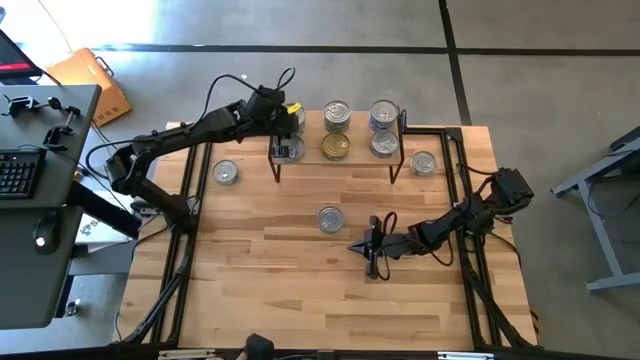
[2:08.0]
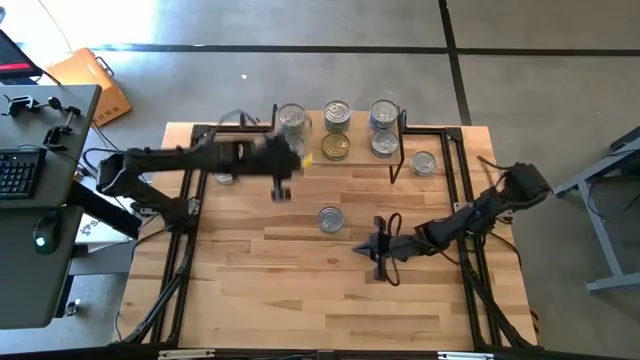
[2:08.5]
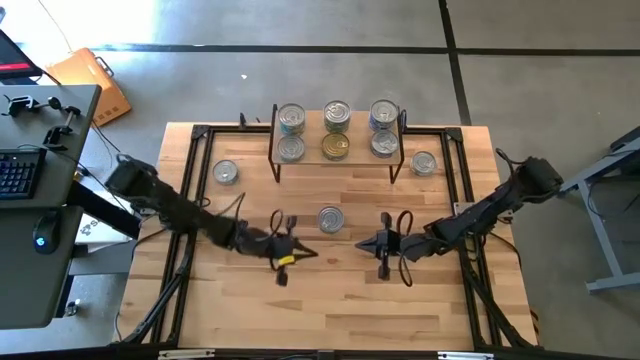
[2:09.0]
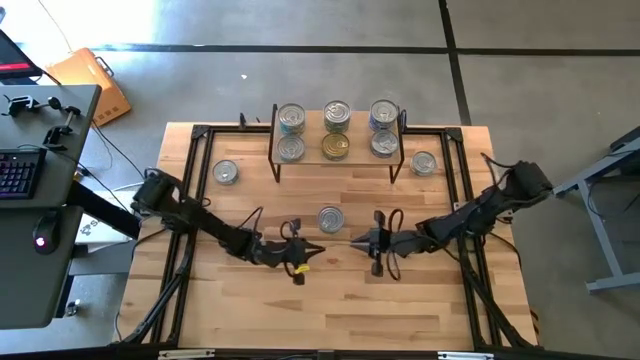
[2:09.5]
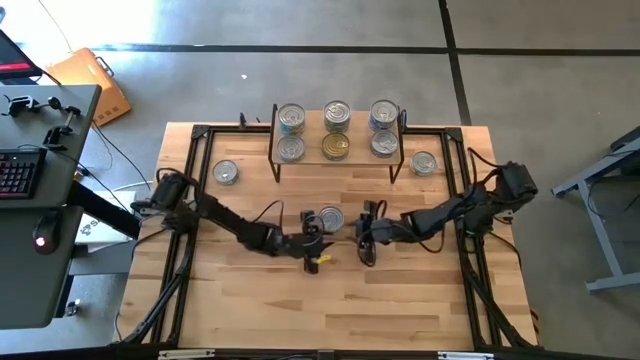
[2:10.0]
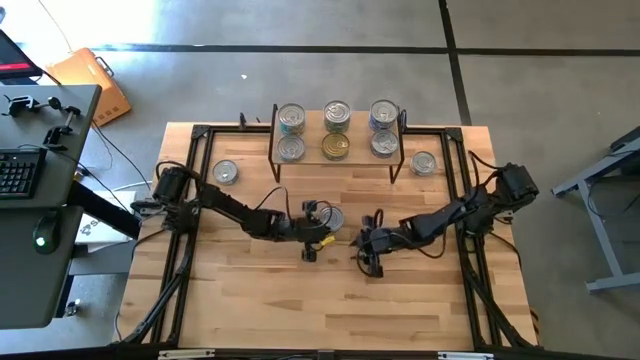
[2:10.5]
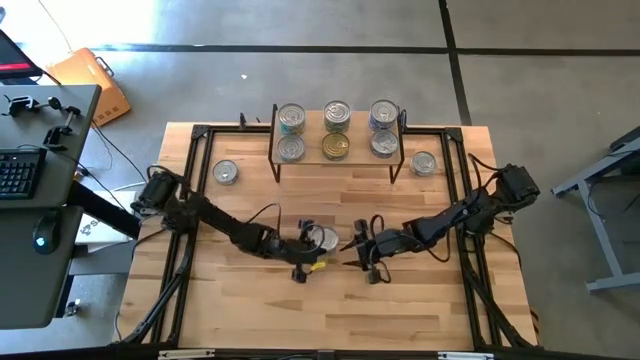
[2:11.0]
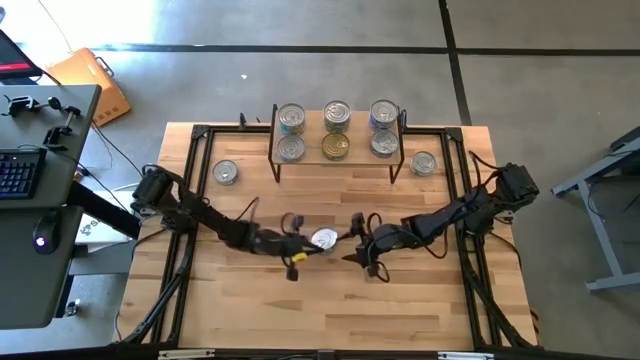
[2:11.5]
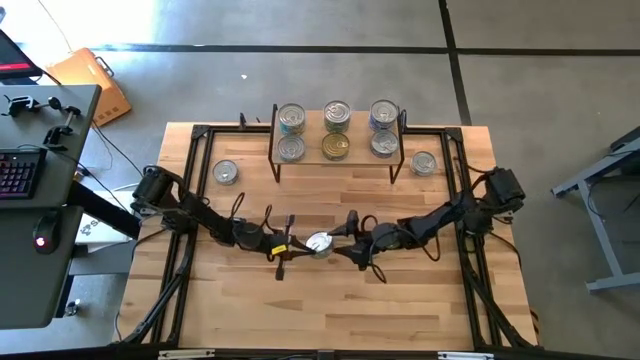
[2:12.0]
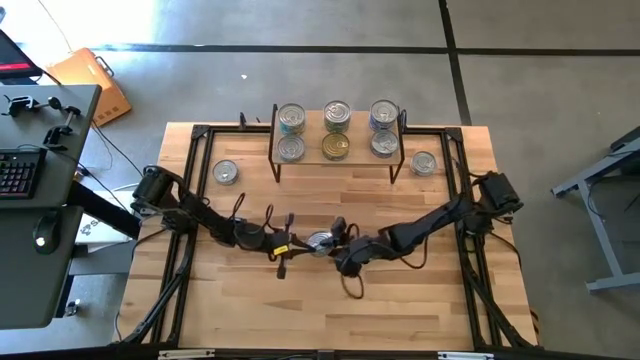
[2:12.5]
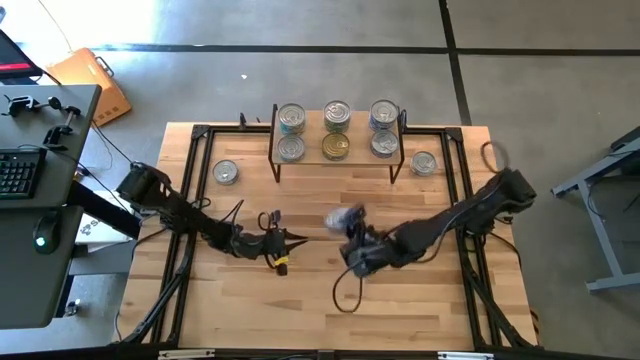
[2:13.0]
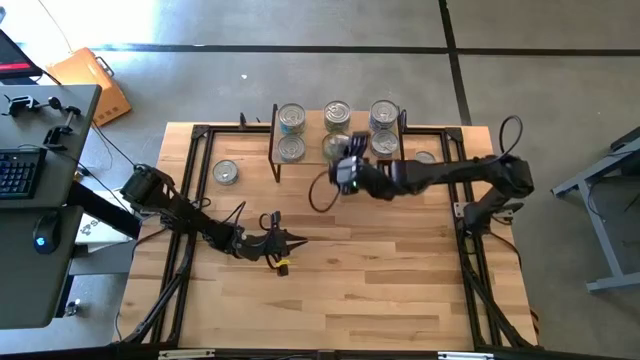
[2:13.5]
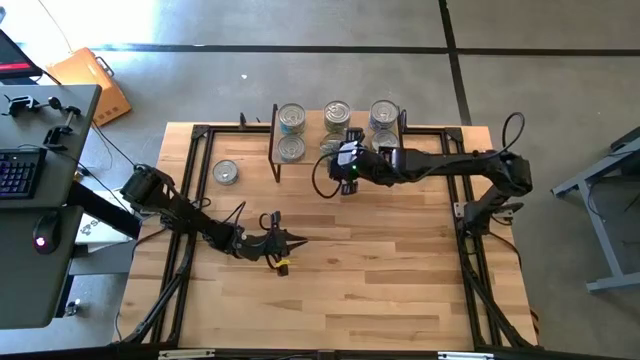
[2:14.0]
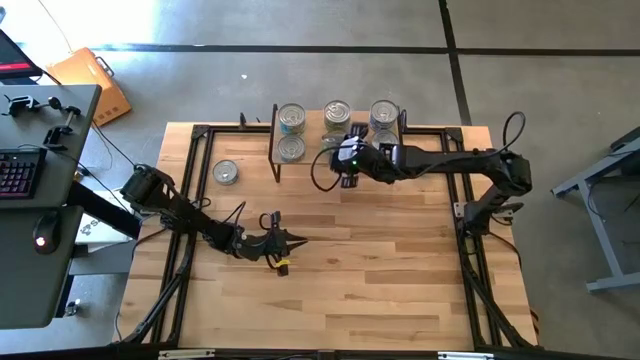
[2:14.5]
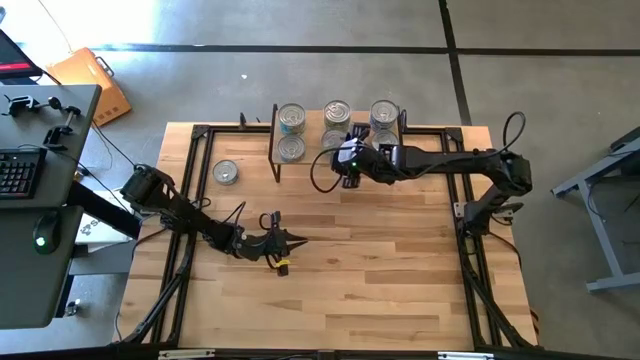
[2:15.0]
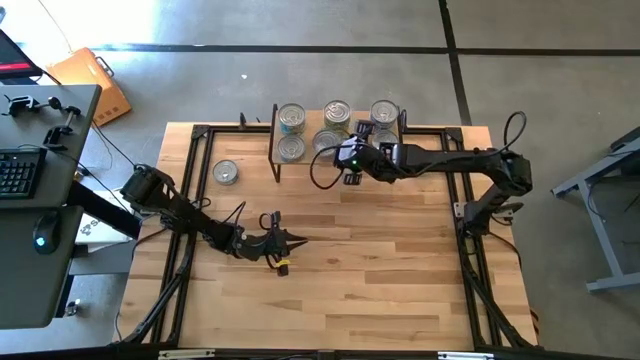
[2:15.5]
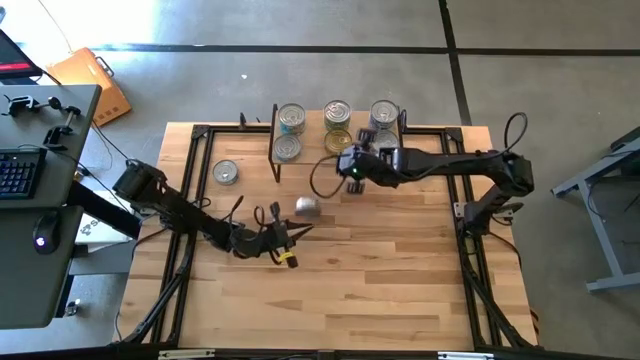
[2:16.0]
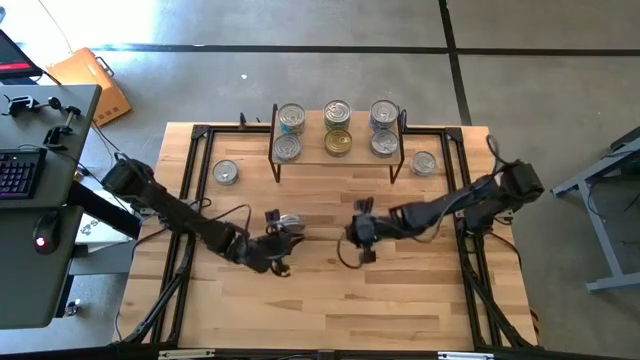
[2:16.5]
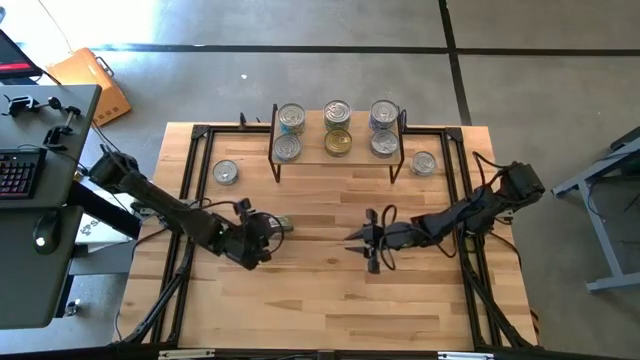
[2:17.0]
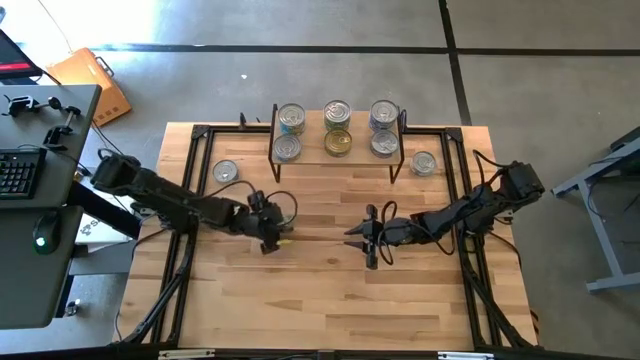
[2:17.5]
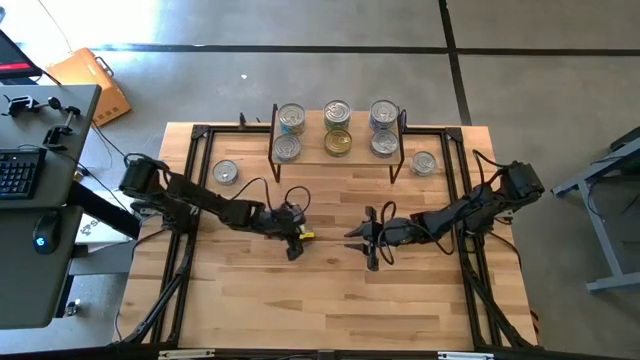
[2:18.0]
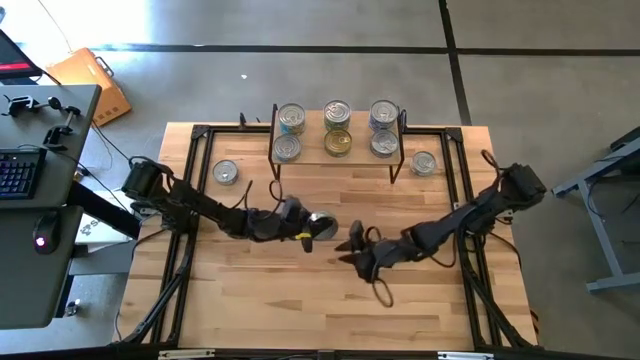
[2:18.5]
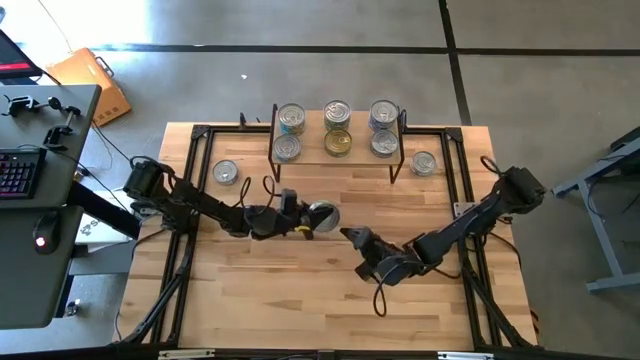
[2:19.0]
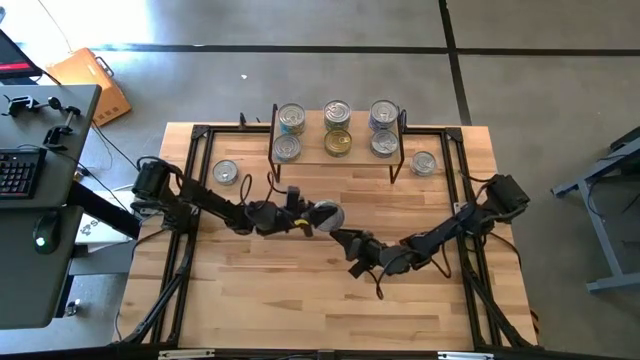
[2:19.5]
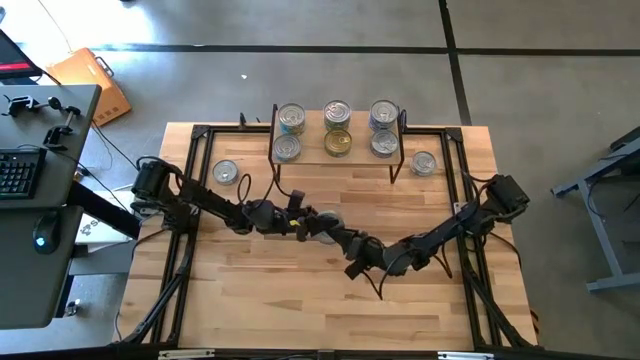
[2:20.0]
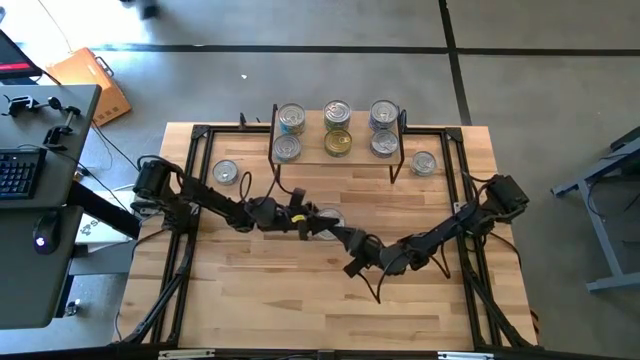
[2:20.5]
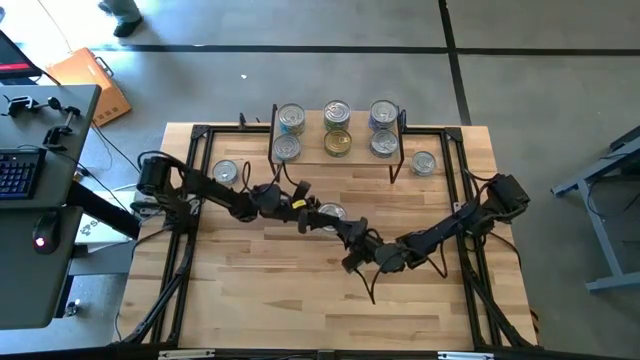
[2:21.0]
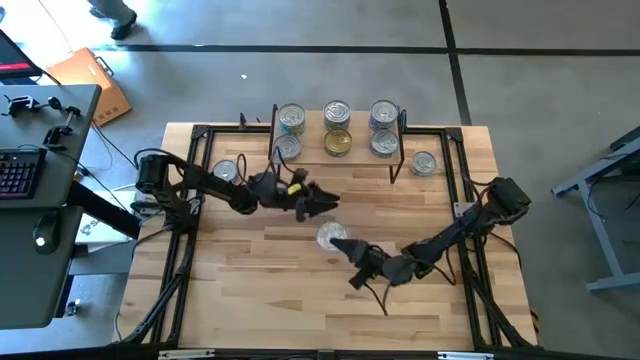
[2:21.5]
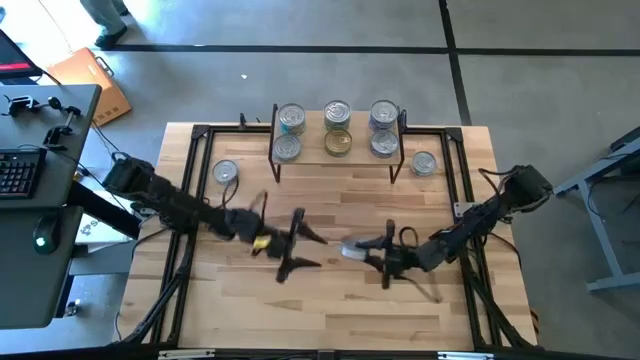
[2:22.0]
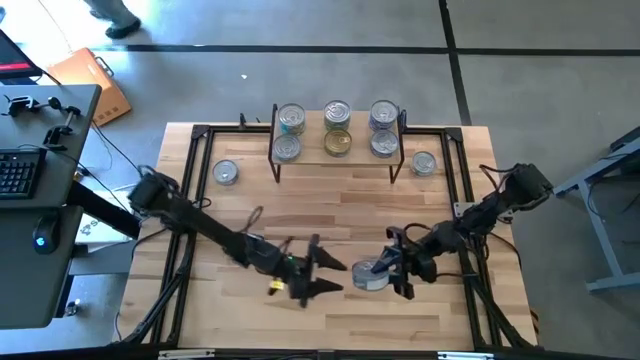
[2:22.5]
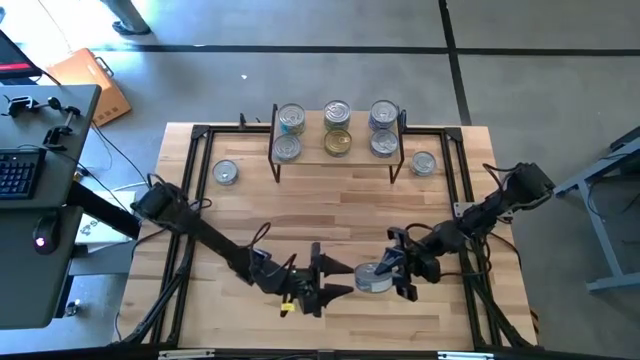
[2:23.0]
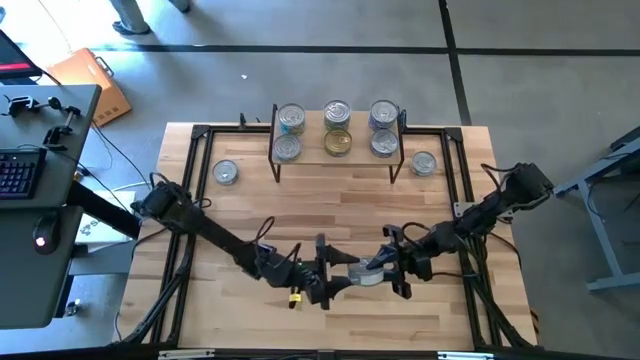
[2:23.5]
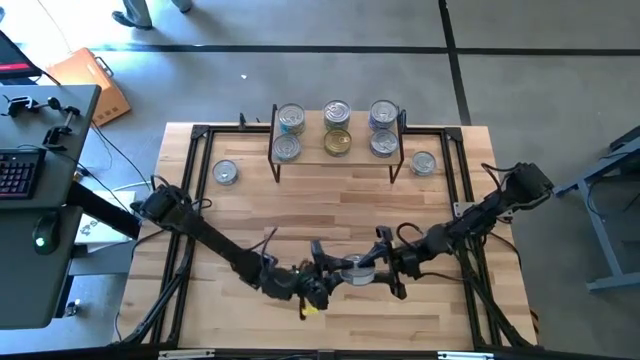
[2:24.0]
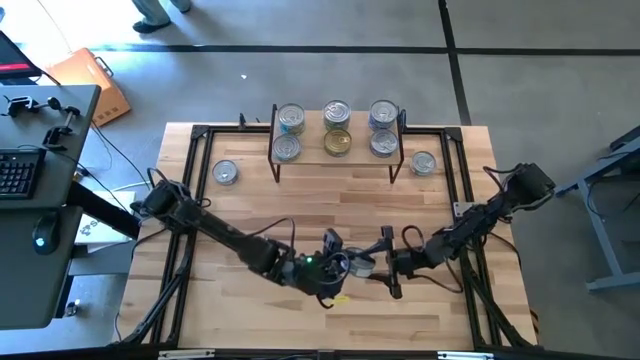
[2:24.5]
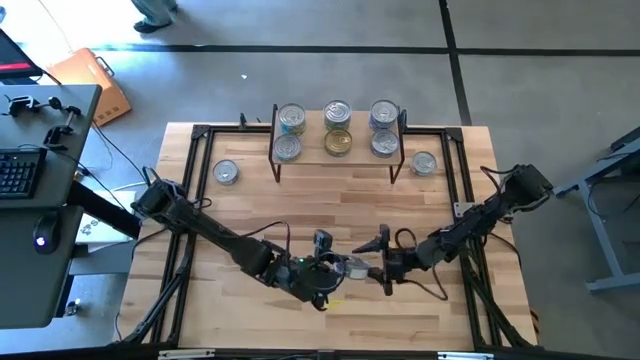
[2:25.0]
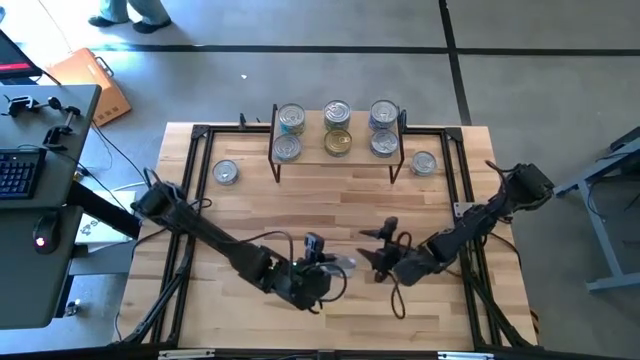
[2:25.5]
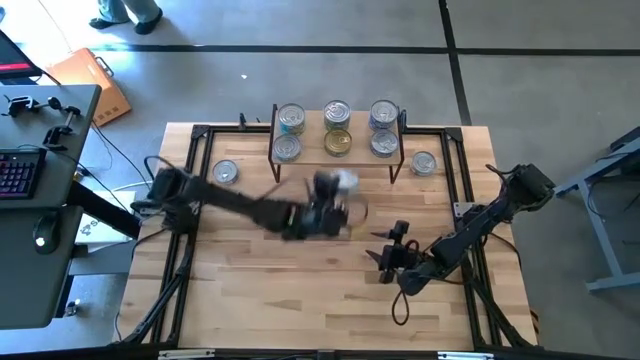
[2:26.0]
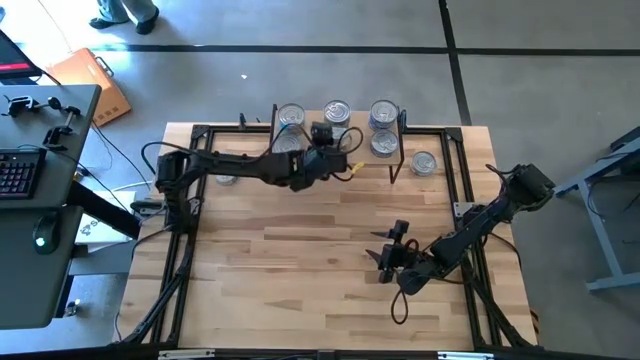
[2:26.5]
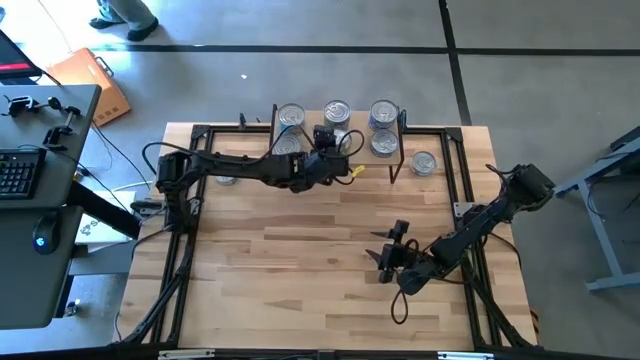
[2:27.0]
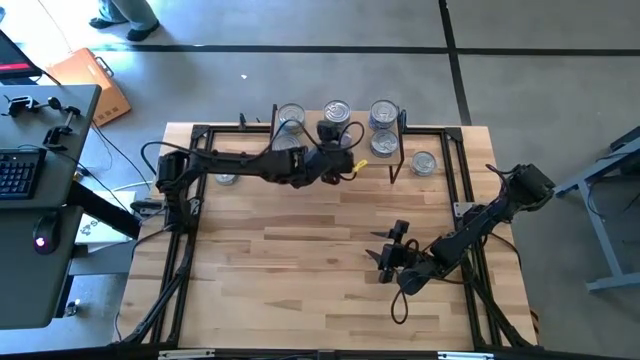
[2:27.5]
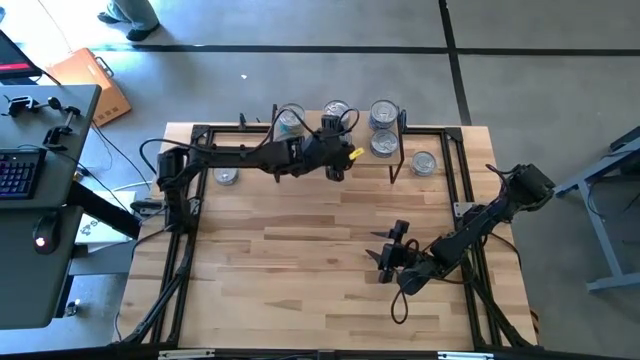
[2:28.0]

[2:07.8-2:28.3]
Task: Stack canned seafood by type on shelf
Stack the green tuna can on top of the other green tuna can on the shelf

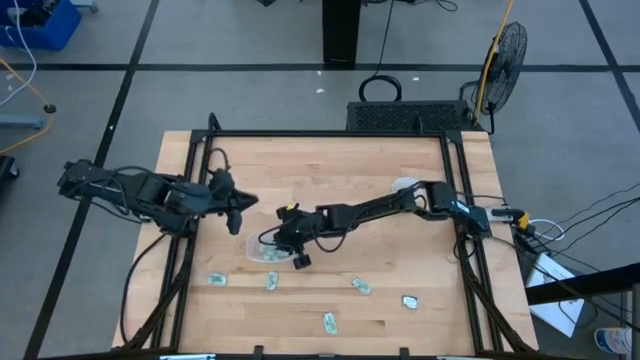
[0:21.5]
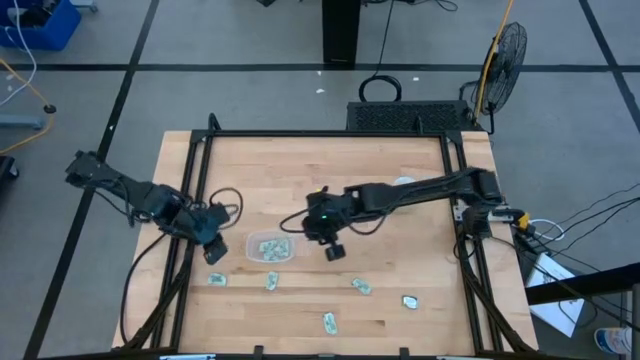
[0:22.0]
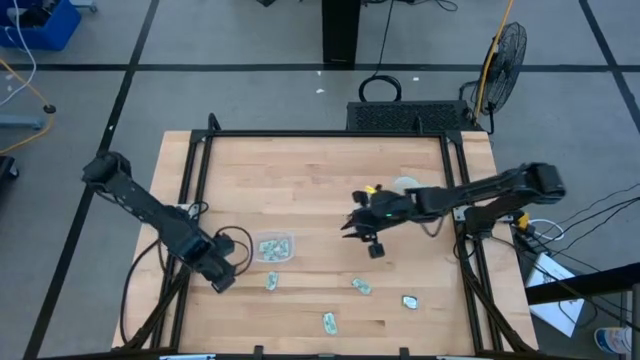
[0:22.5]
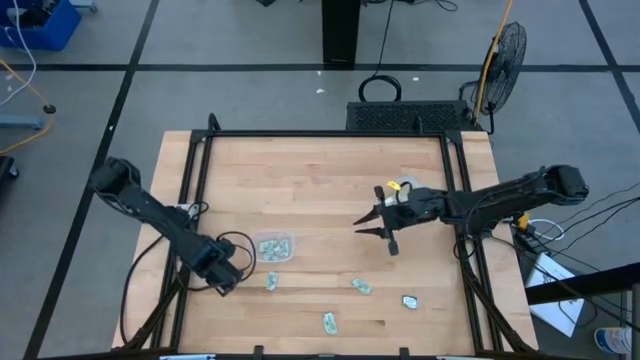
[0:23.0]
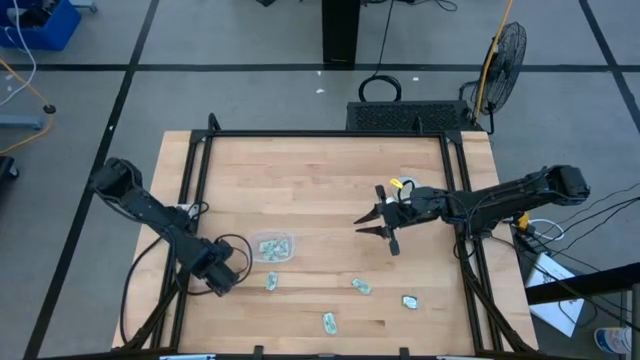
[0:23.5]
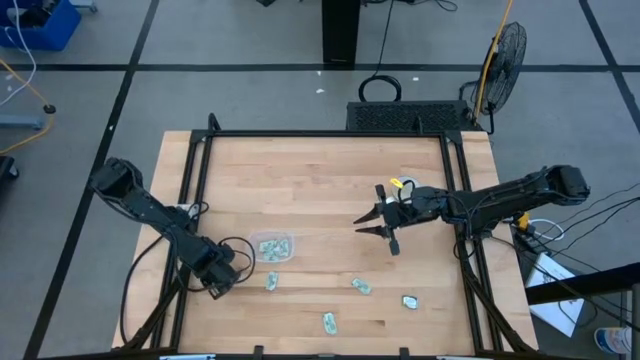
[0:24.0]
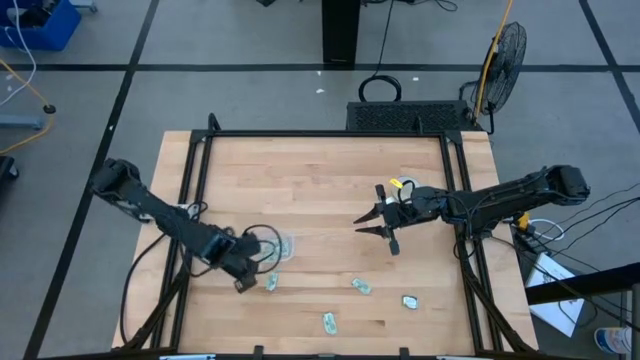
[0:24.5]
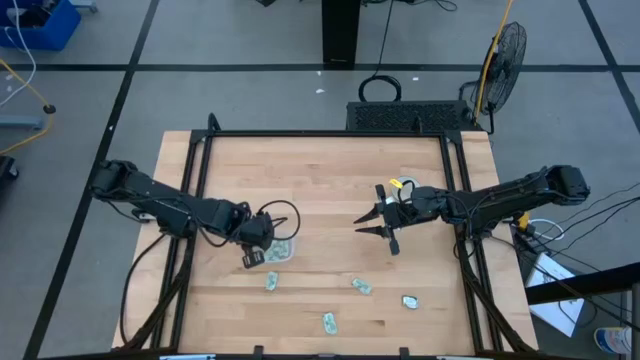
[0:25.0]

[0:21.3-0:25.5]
Task: Pick and place Stevia / Truvia into bins
Put the stevia packet into the transparent bin
